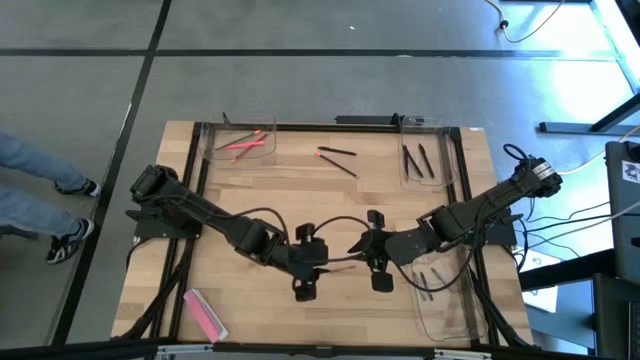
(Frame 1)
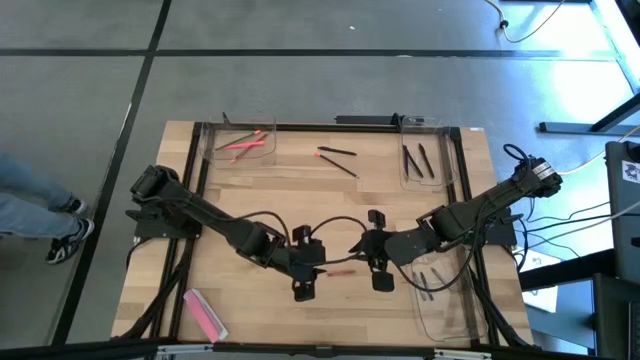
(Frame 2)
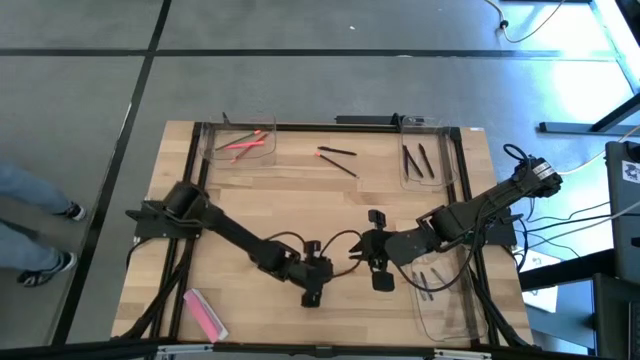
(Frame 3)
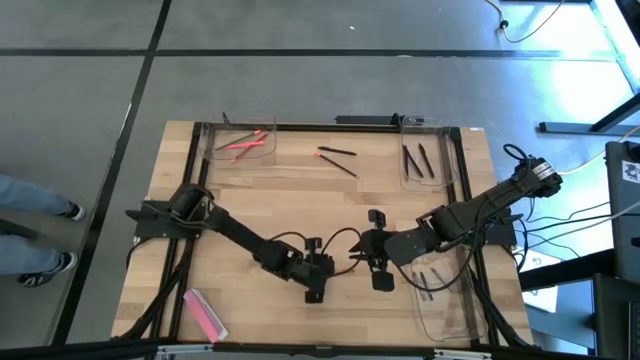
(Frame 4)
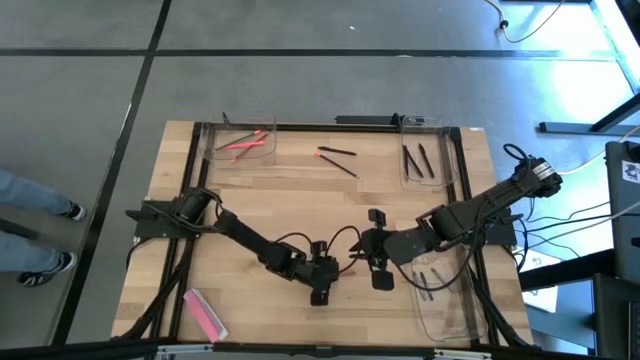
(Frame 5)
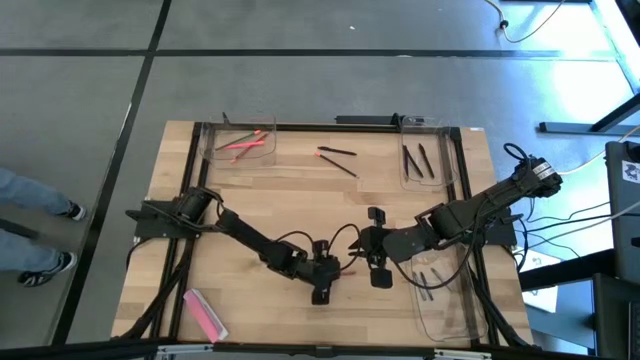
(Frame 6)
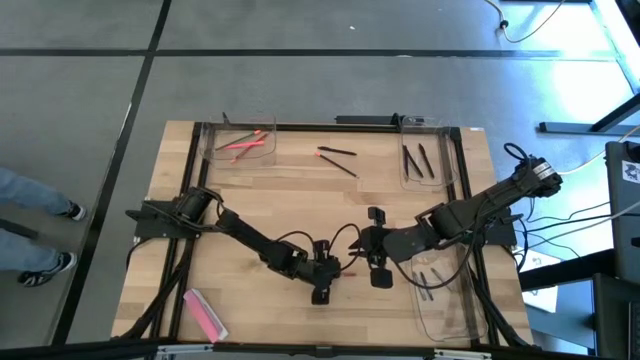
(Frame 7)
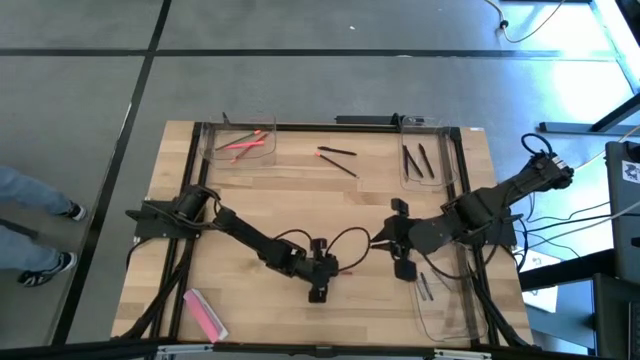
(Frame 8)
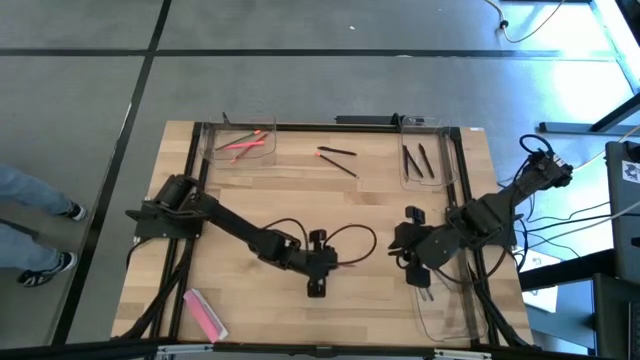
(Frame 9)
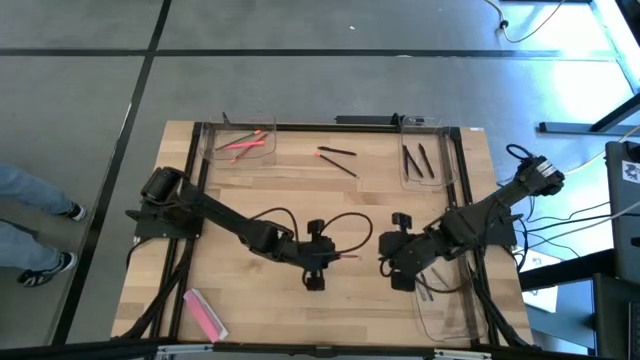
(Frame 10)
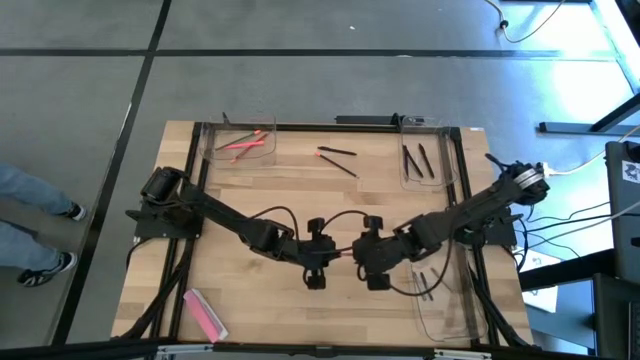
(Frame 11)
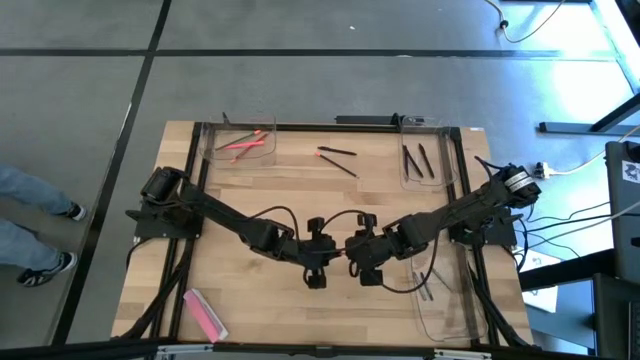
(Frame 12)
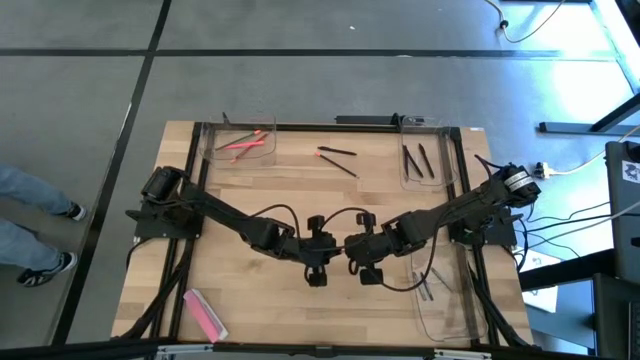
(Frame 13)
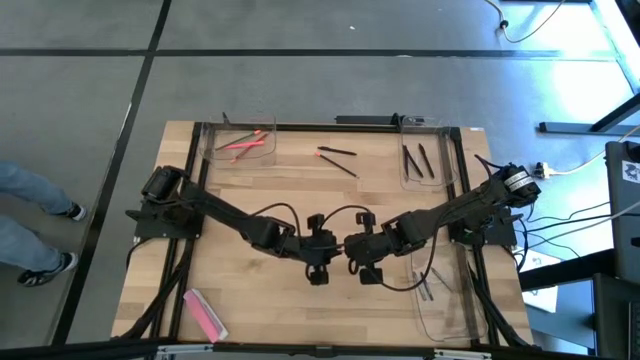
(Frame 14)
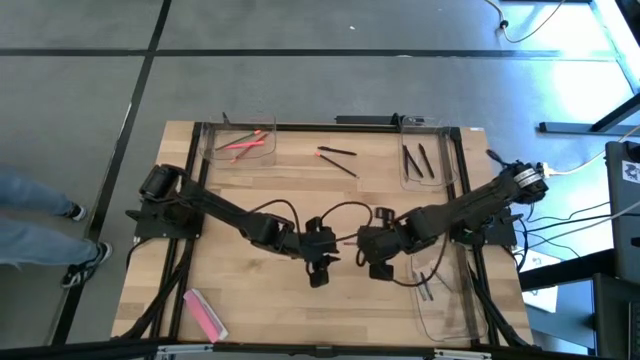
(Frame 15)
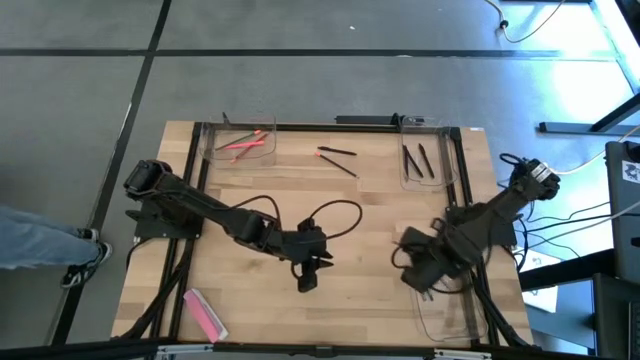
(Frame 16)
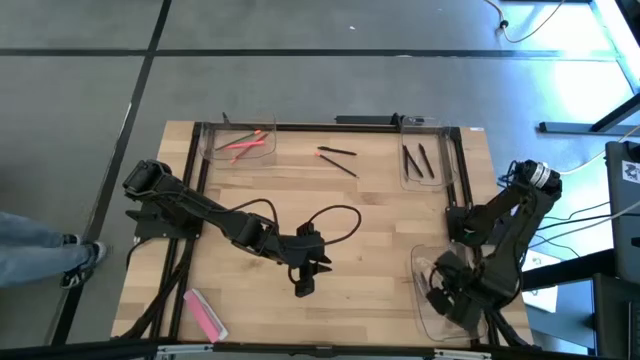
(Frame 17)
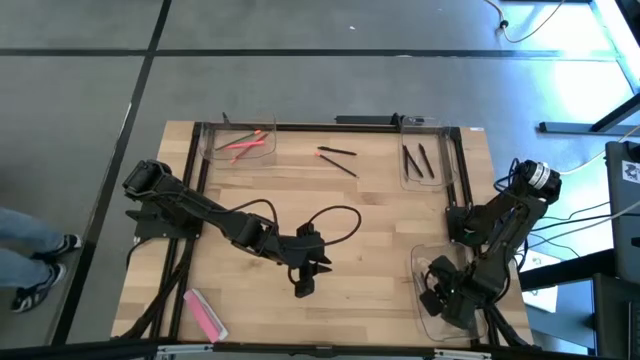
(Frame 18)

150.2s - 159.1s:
Task: Sort crayons/erasers/pens/pencils in bins
Put the red crayon into the bottom transparent bin

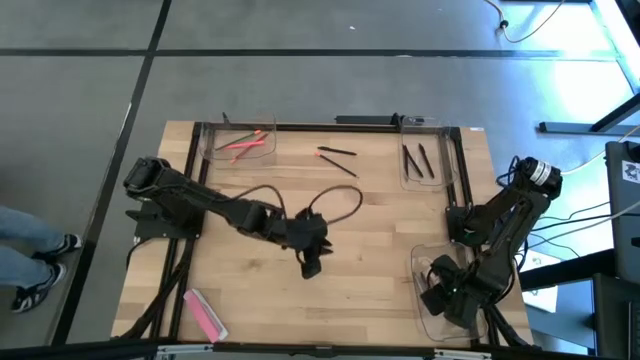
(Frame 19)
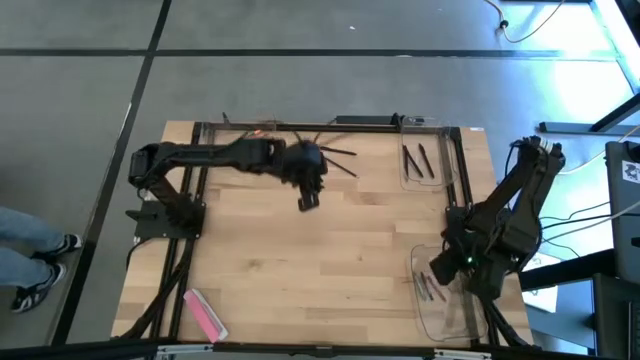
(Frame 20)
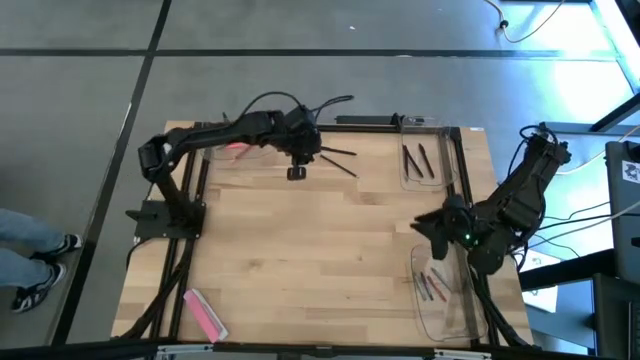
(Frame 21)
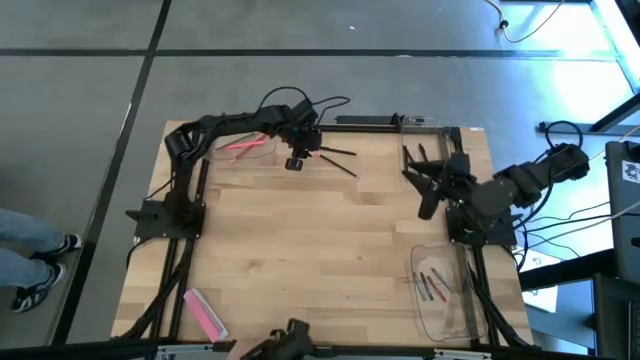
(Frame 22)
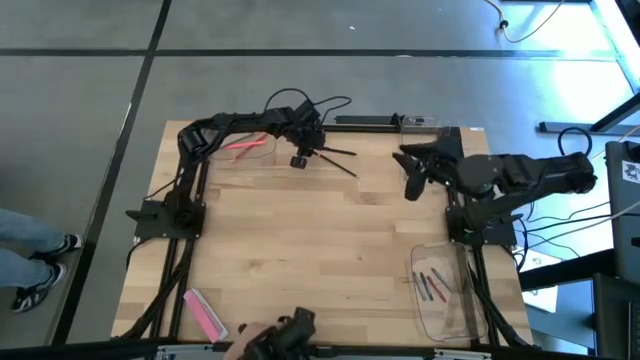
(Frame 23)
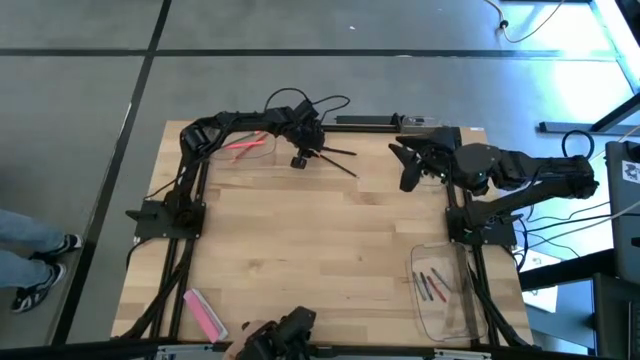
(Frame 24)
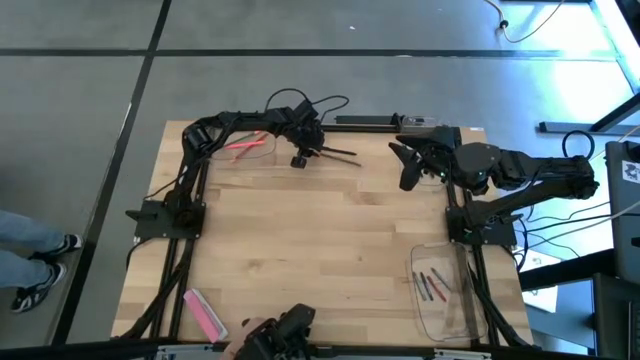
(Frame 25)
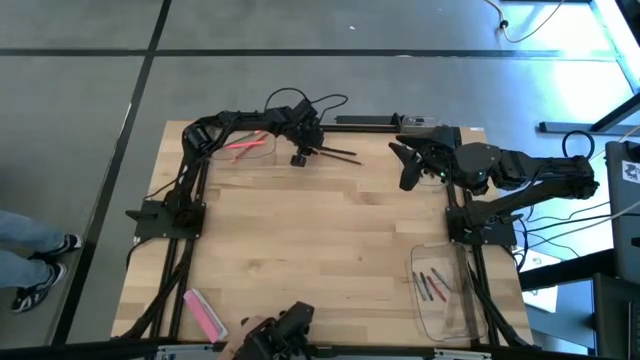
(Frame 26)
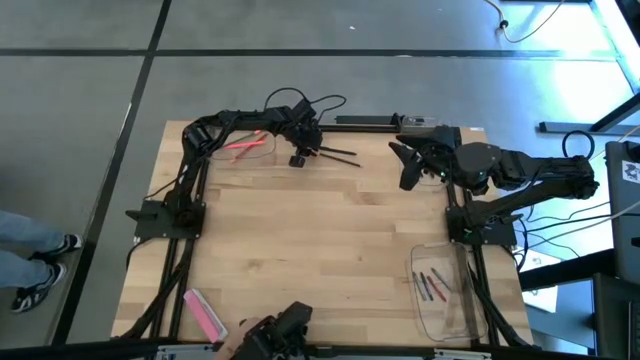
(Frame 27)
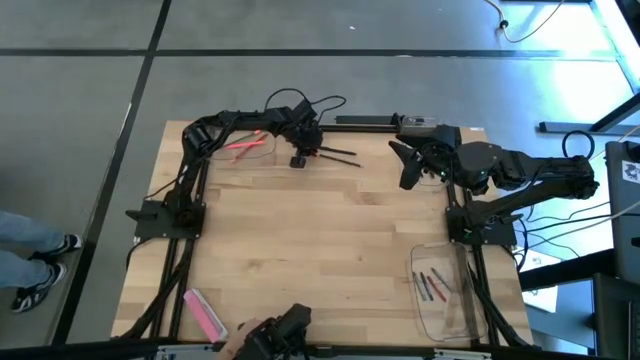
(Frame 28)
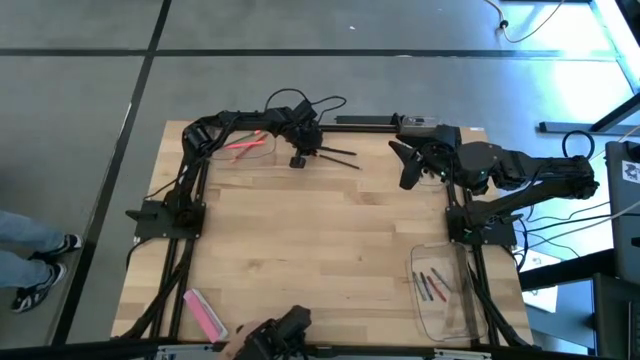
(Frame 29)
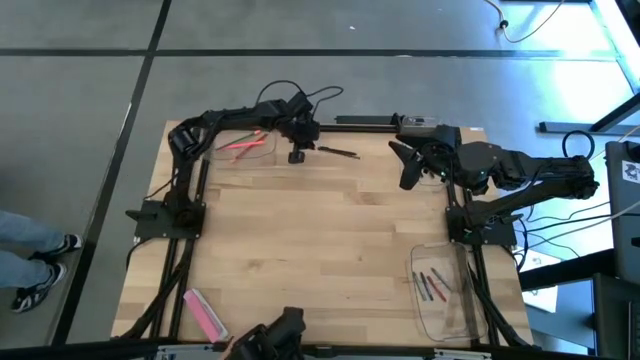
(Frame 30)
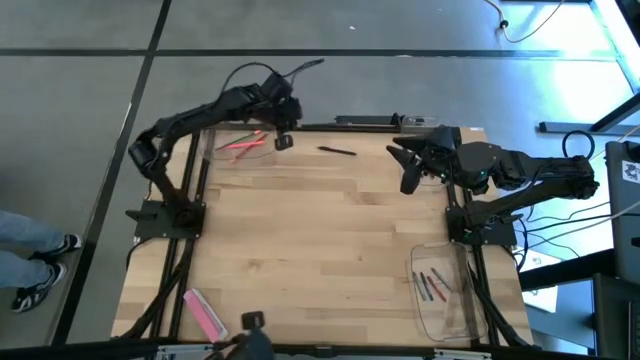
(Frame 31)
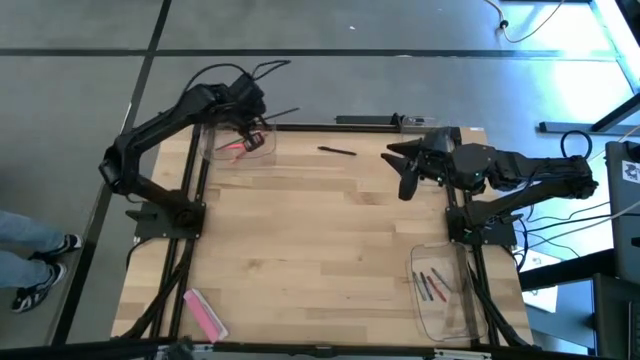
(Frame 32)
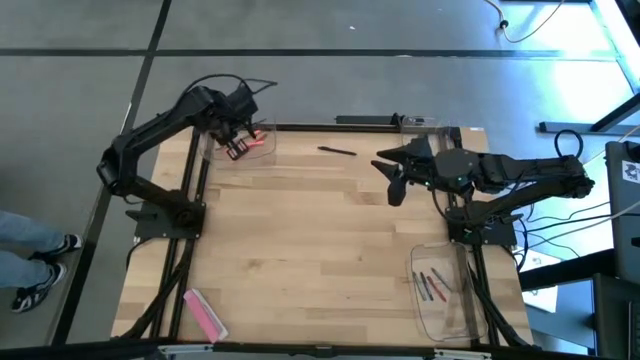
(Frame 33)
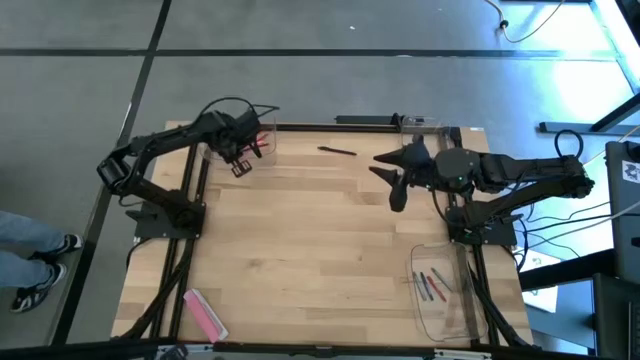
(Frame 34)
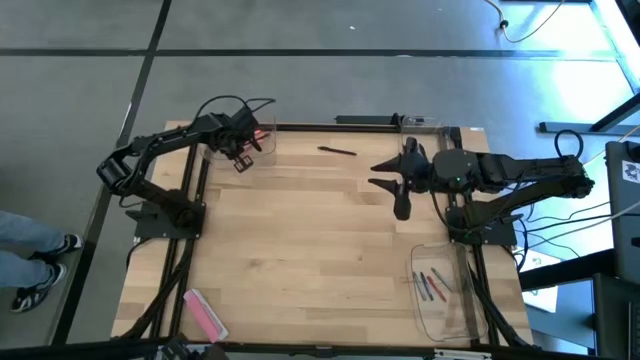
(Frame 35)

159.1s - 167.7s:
Put the dark blue pencil into the top left transparent bin

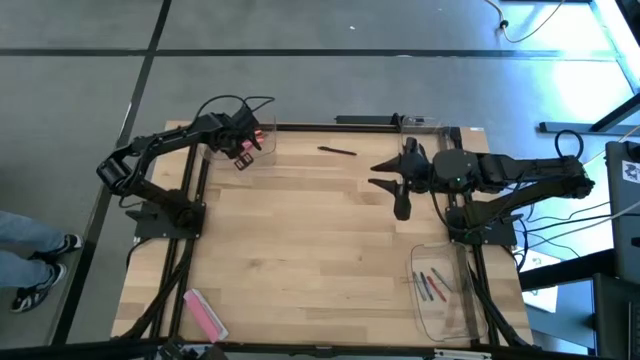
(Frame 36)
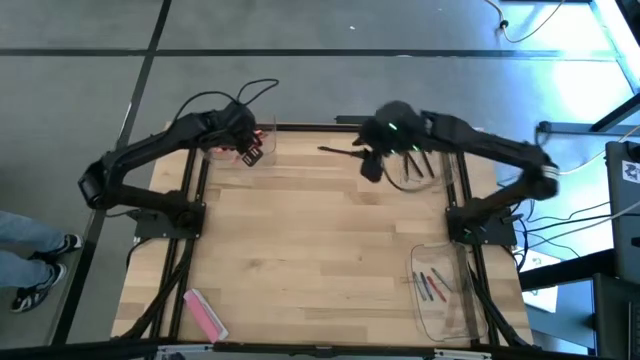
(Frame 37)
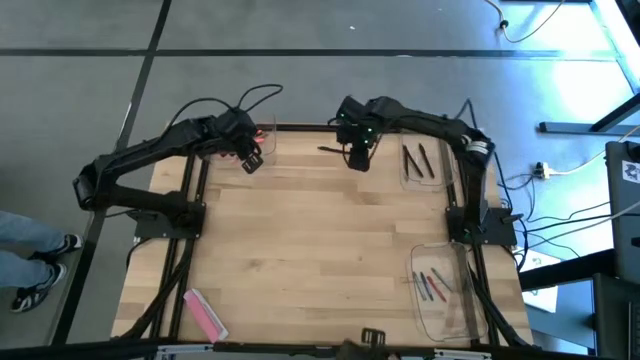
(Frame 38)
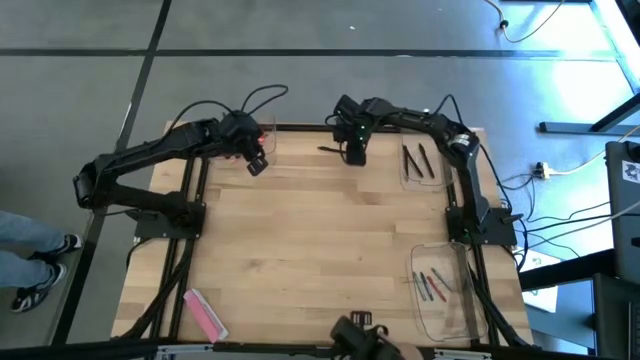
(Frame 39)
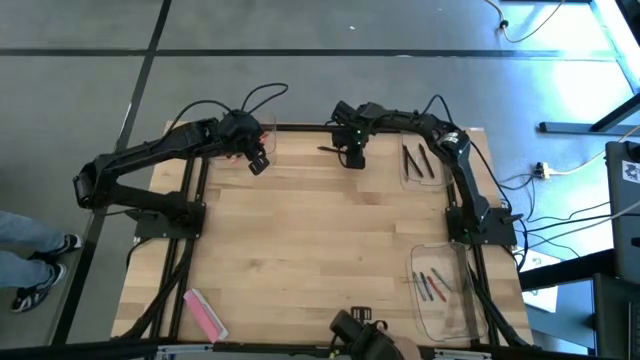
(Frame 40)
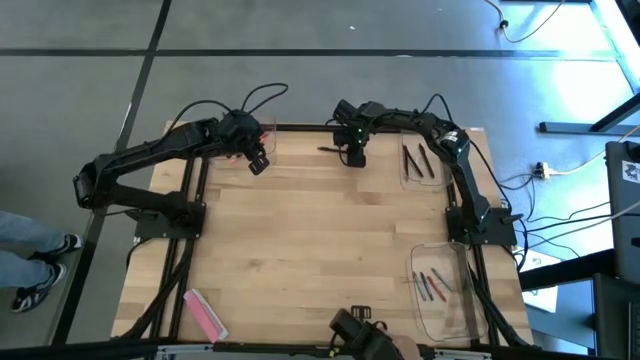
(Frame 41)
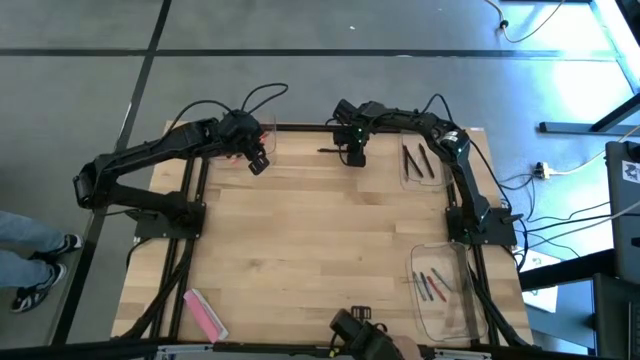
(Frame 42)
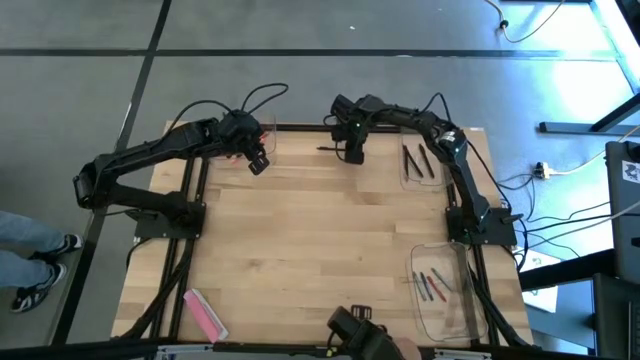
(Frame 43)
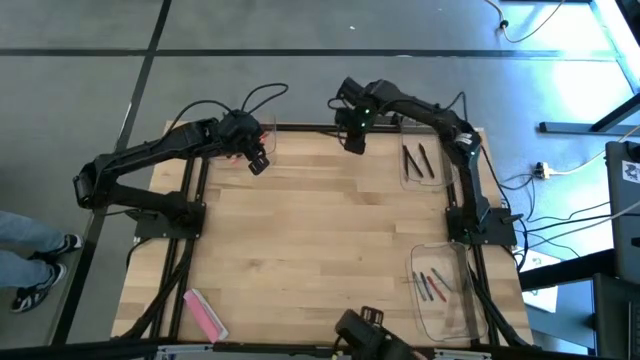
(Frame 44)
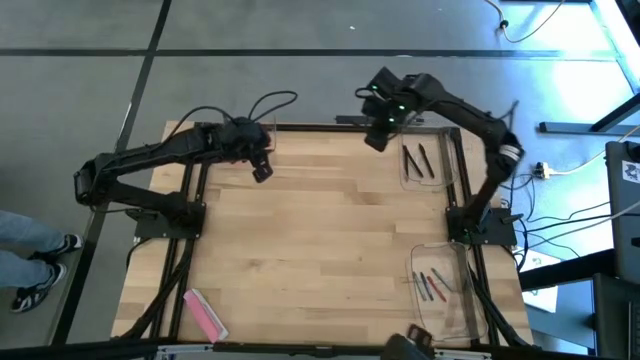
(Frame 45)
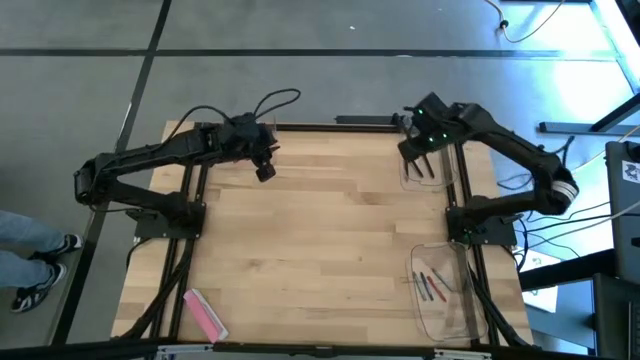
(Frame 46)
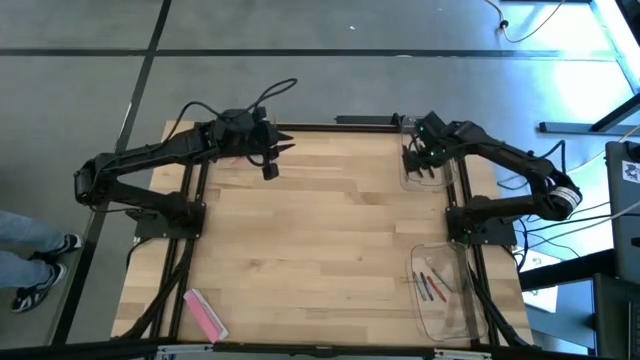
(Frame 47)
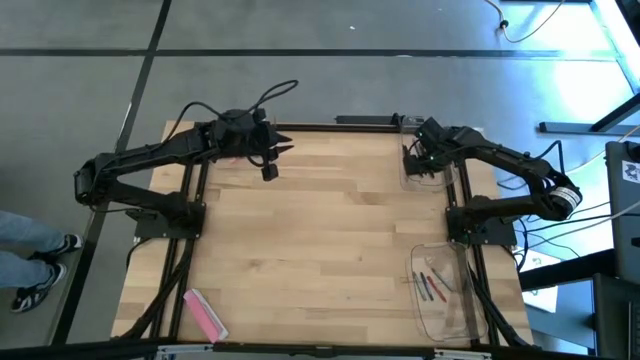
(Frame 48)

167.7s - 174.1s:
Put the black pen into the top right transparent bin
